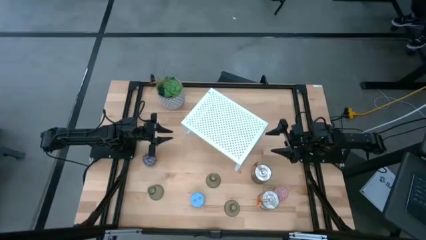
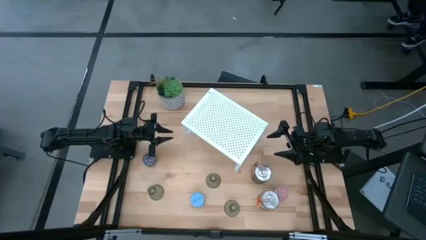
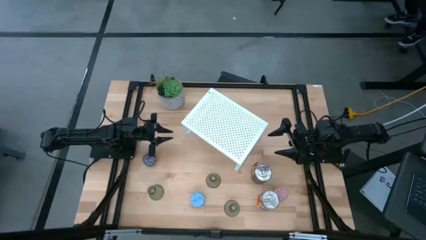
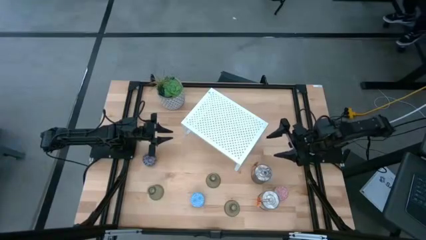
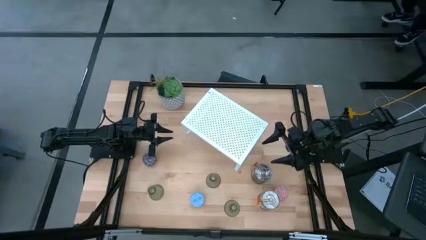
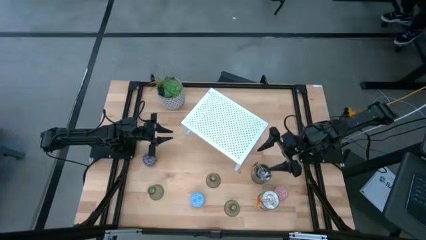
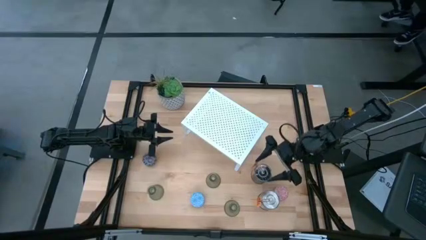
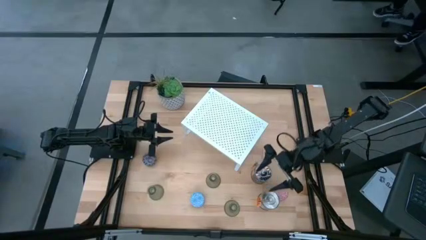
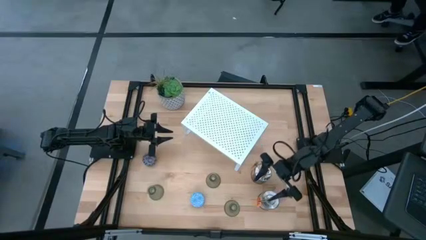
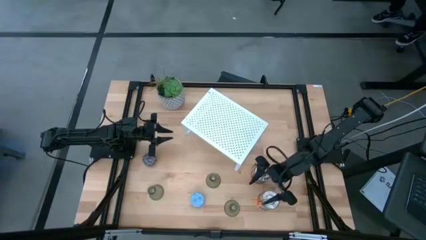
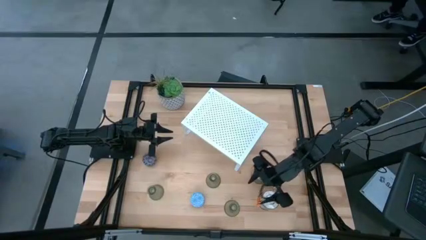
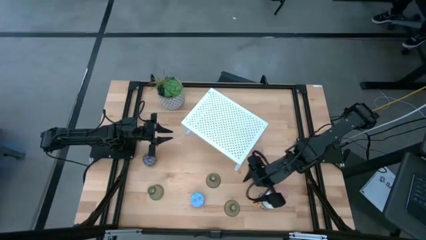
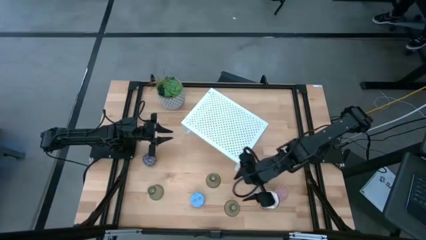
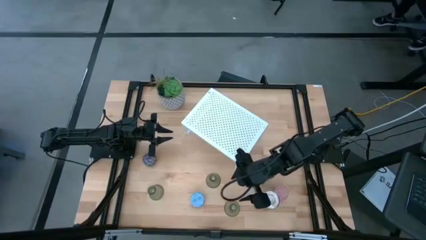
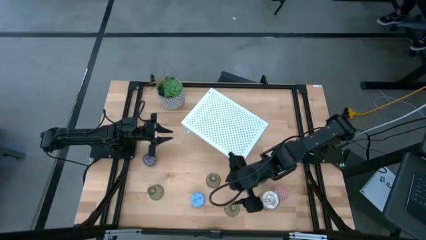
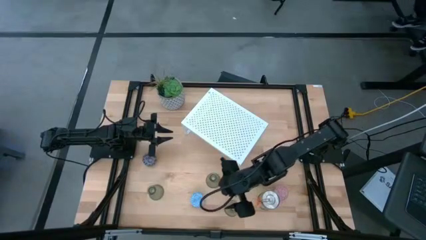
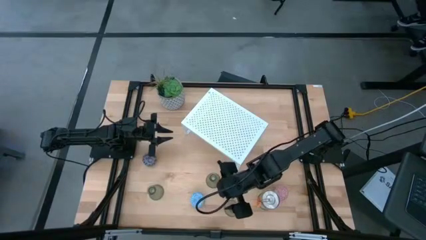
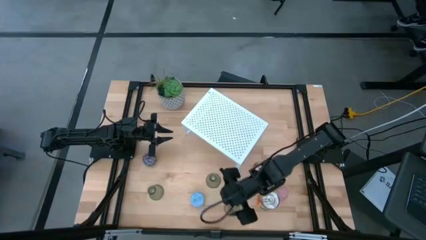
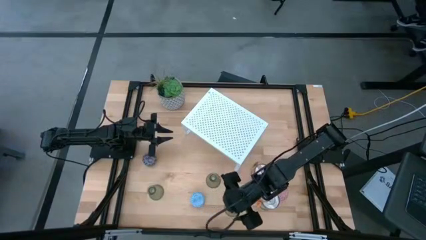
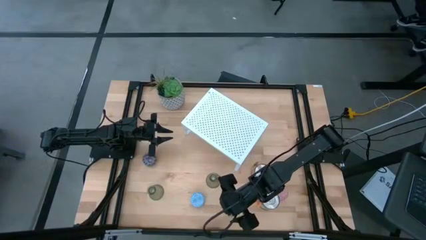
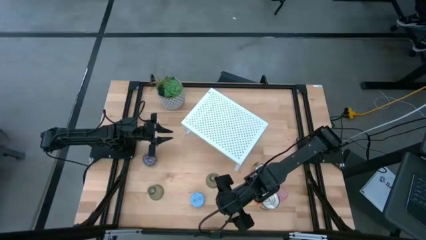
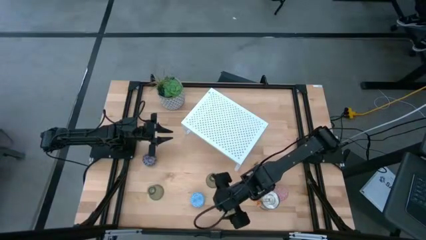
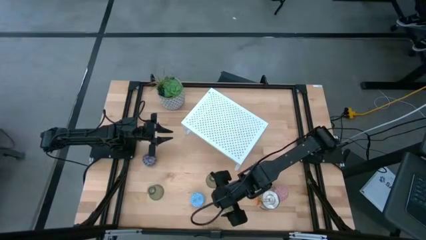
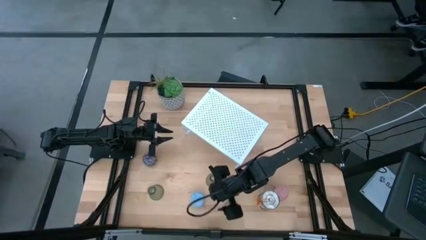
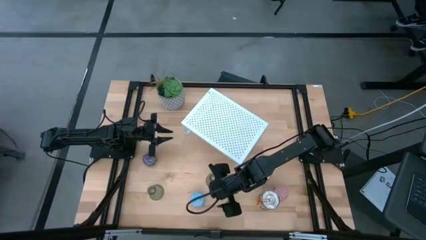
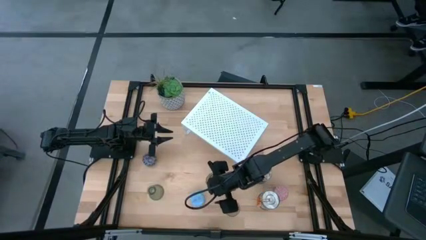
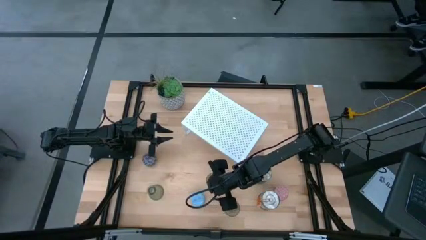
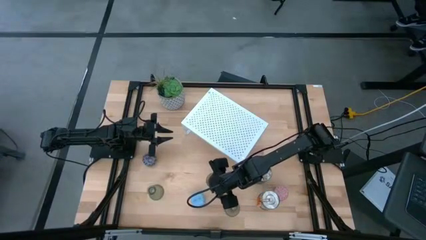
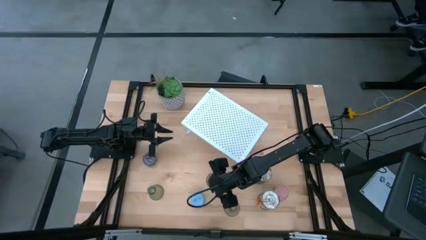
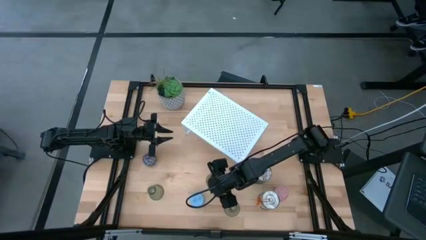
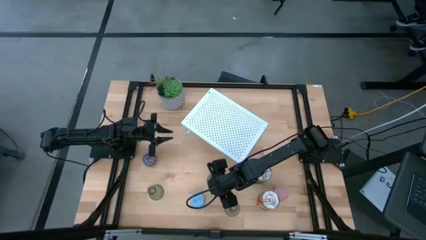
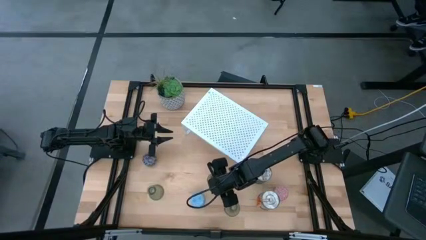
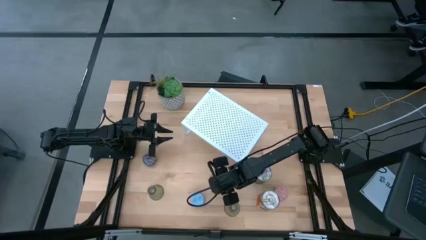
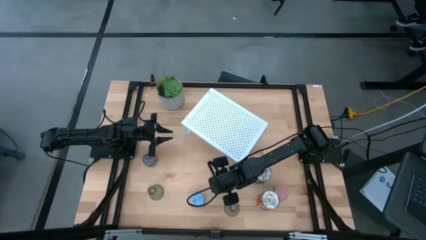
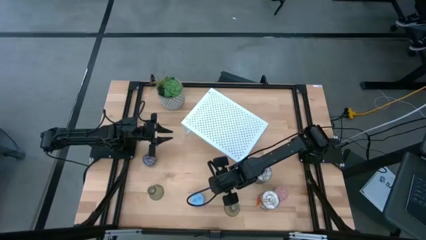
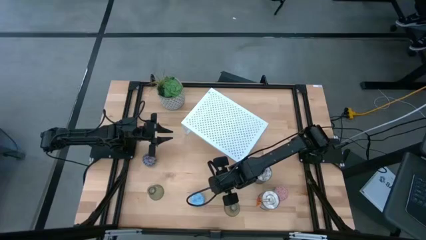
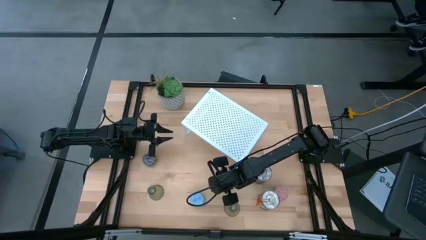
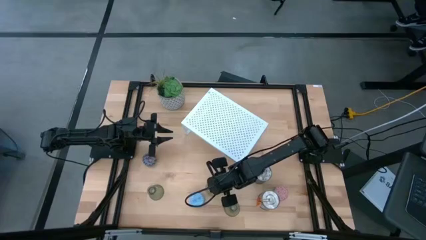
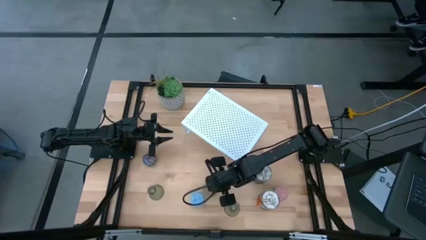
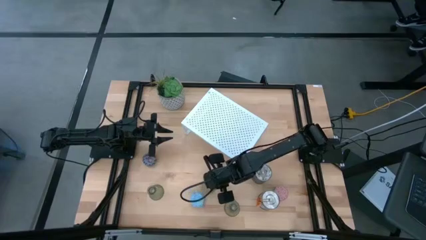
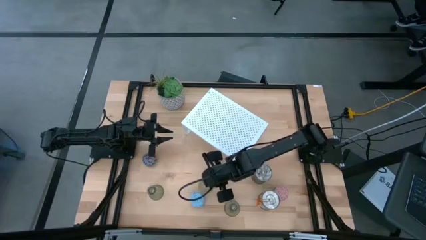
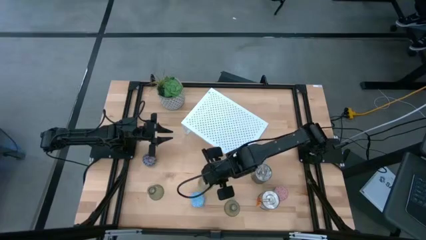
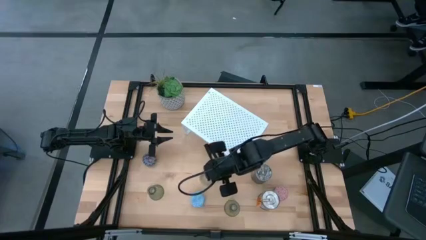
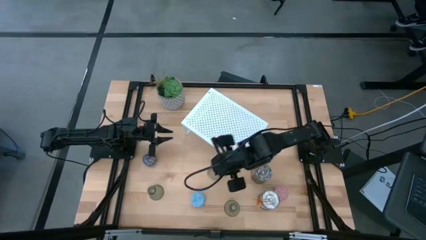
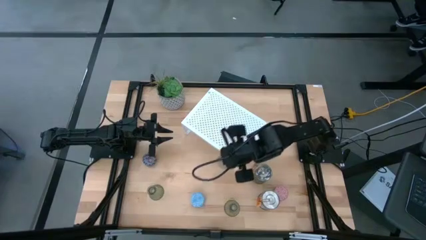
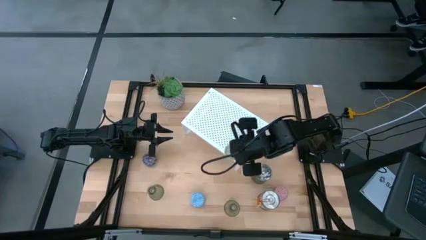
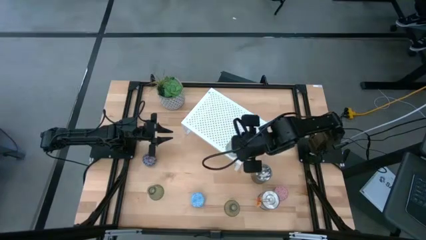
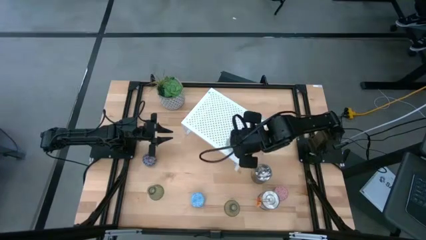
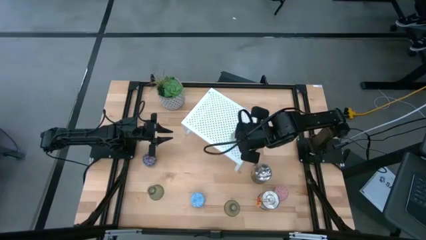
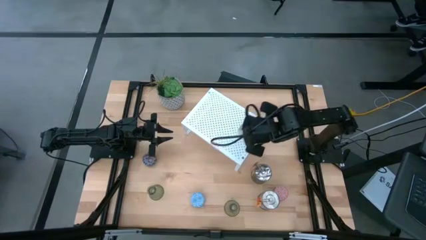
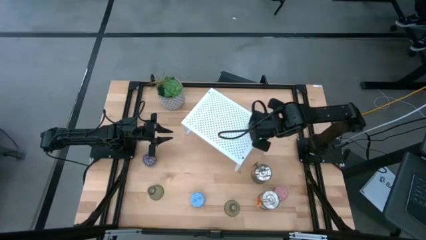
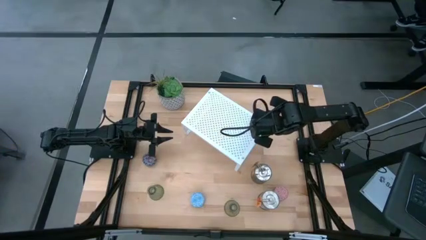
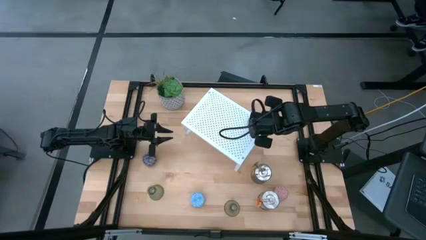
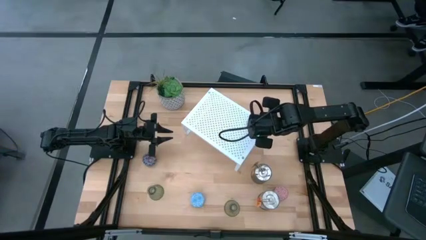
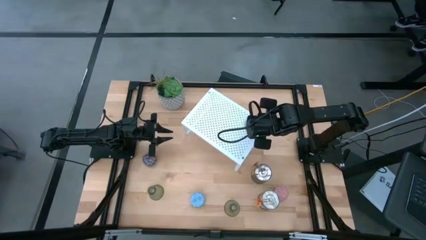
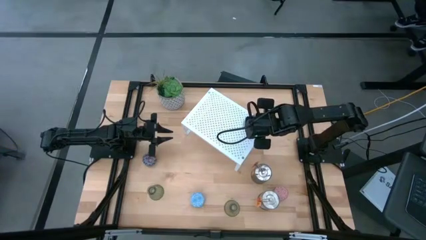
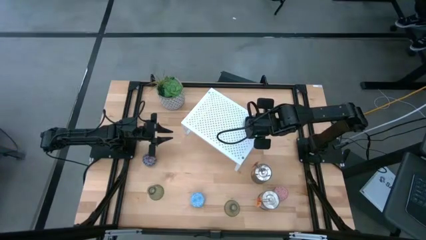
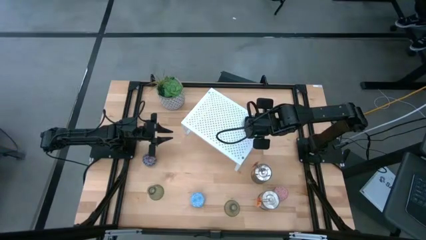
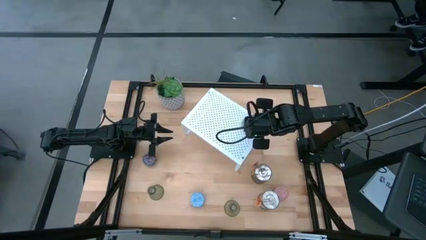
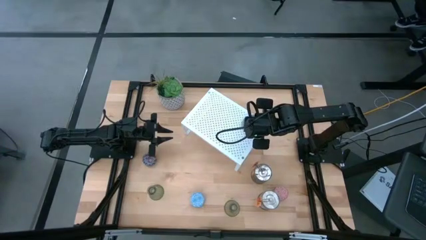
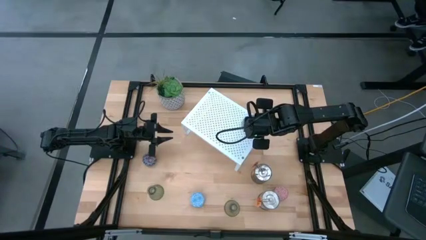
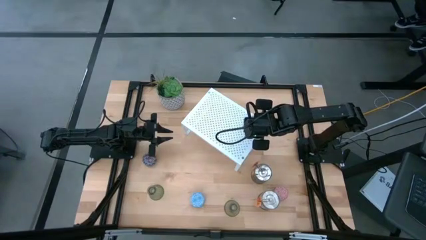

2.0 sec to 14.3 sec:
Task: Pick & Place candle stick holders
Put the top green vase on the shelf

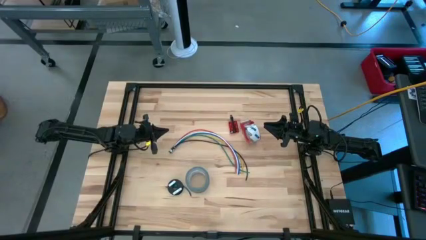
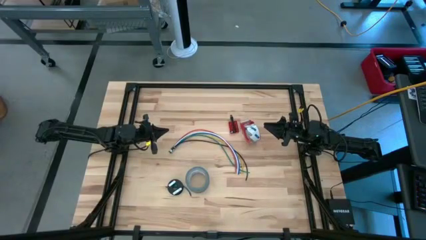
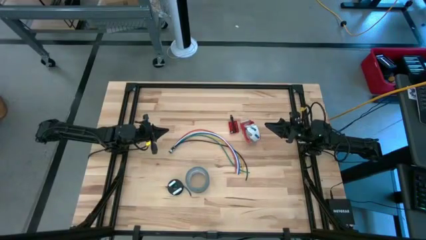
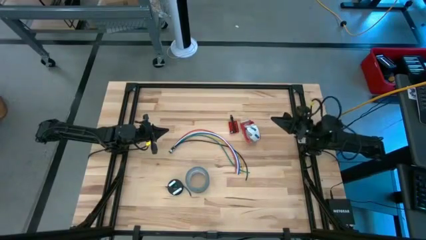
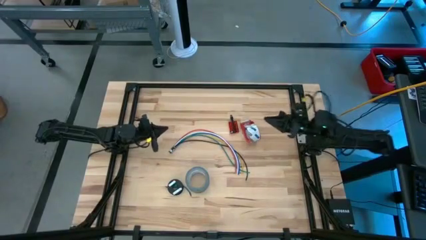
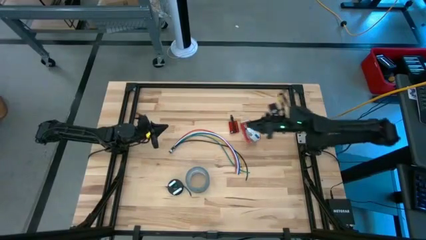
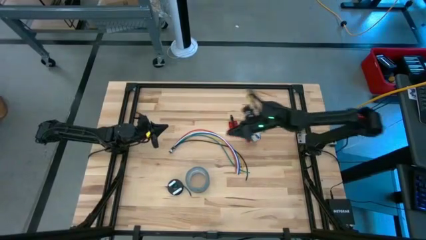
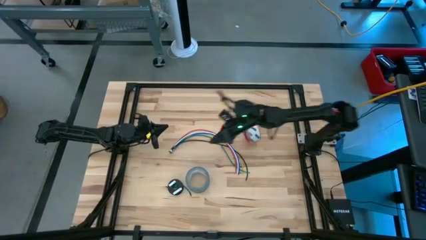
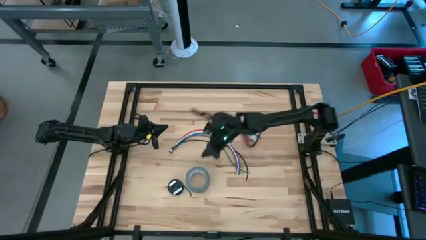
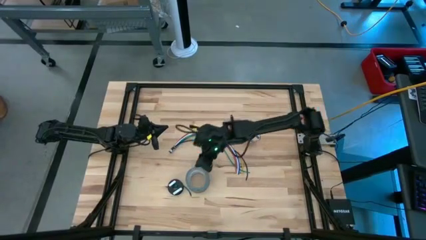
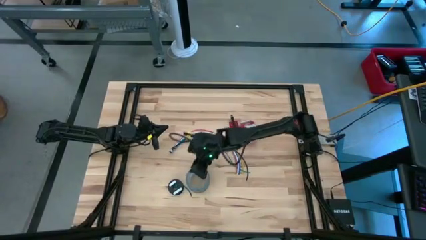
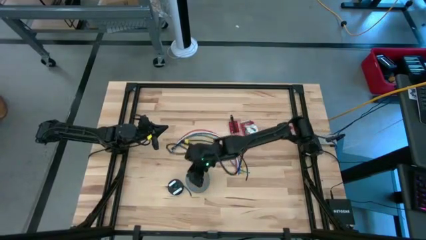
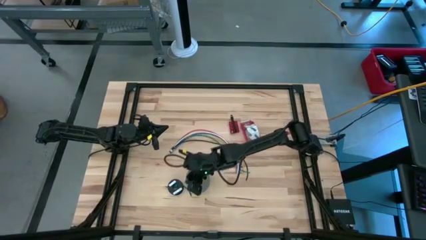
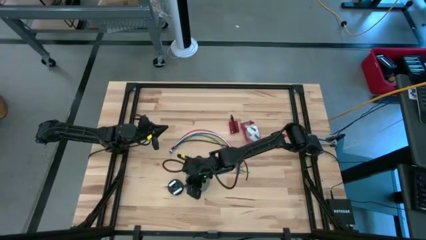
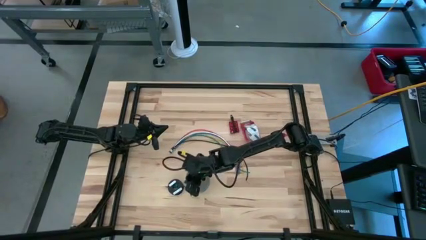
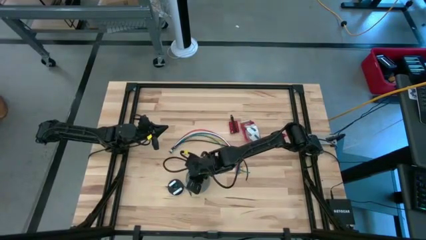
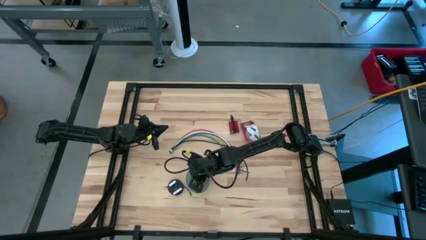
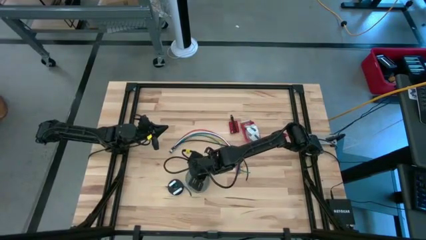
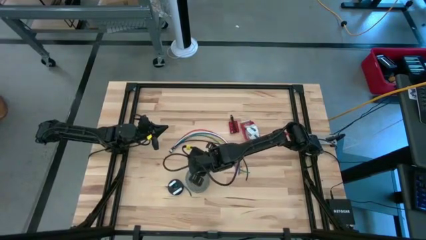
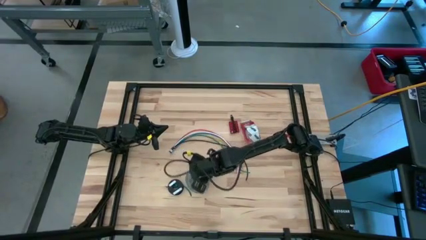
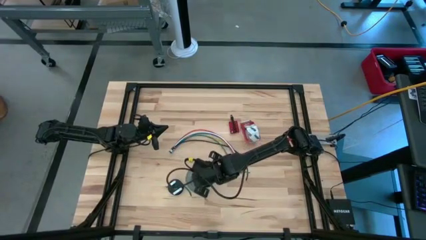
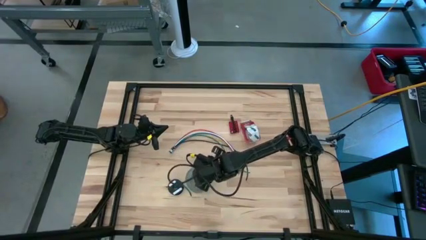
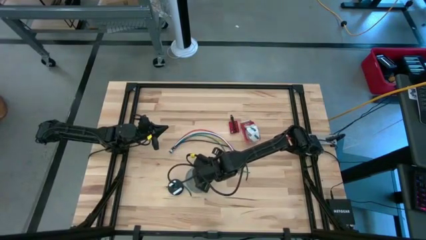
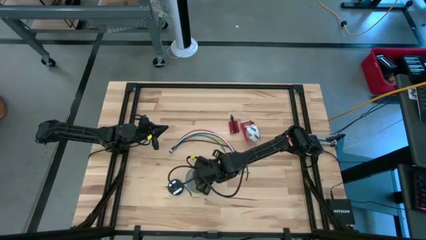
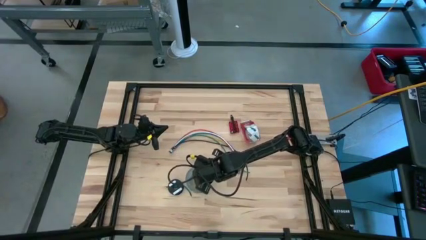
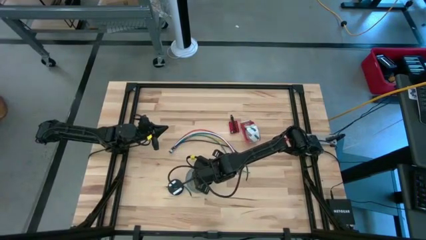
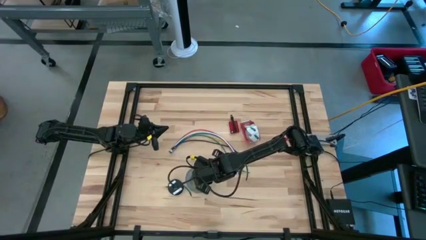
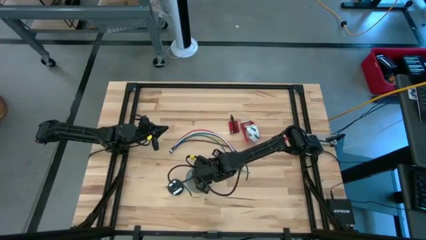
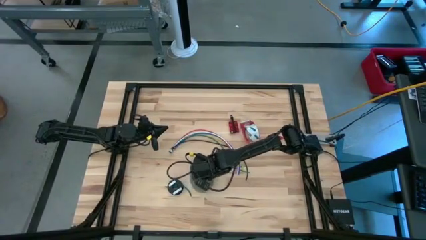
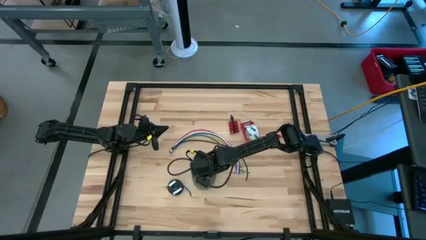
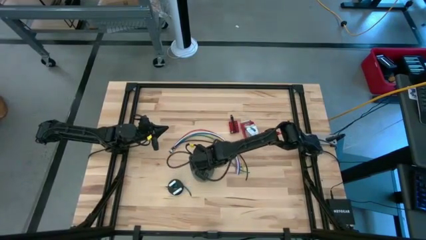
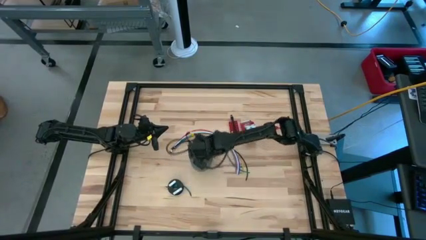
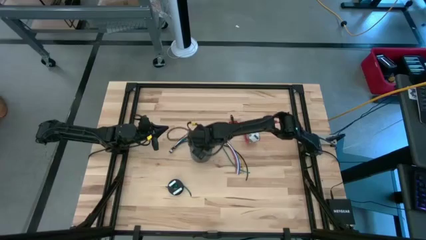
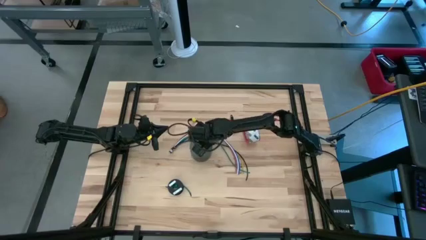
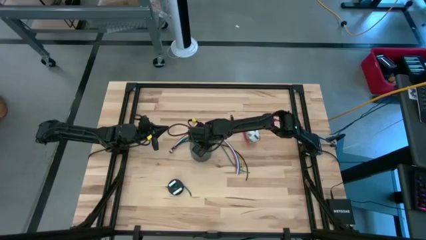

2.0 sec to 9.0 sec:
Task: Coil cords
Move the duct tape to the center of the table
